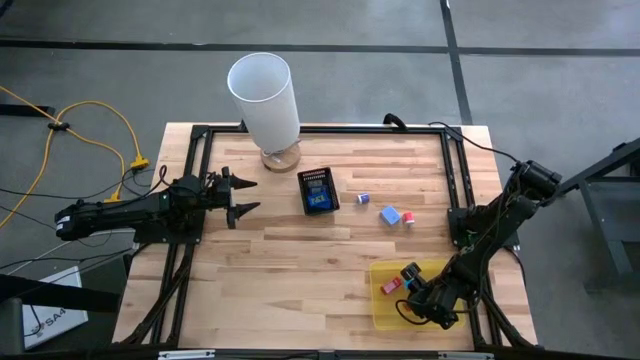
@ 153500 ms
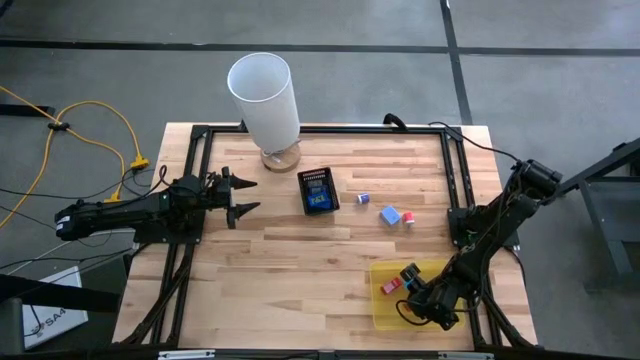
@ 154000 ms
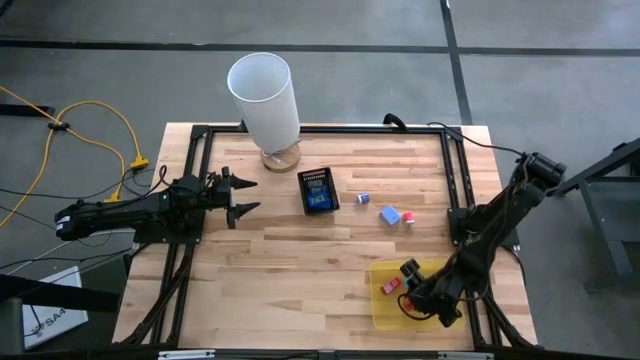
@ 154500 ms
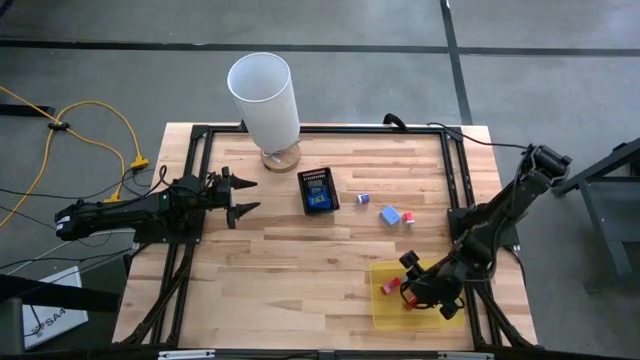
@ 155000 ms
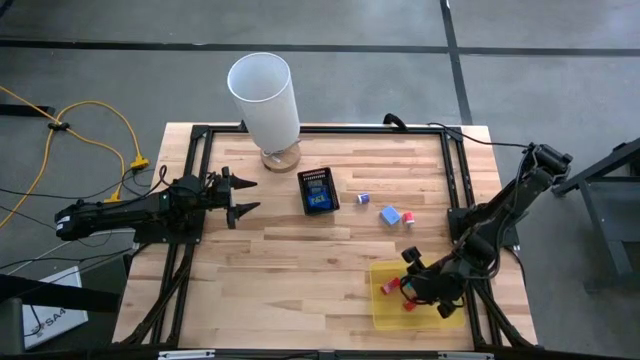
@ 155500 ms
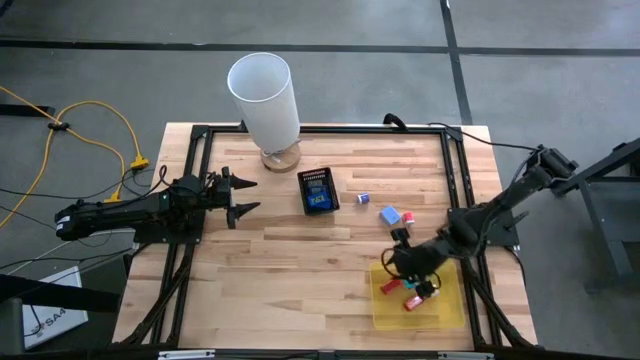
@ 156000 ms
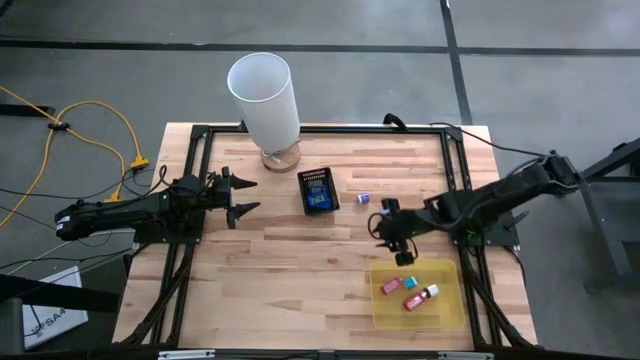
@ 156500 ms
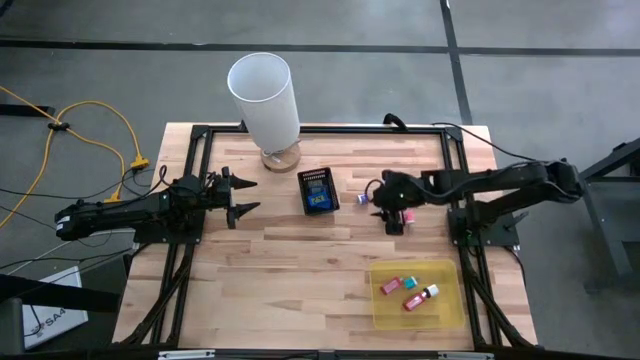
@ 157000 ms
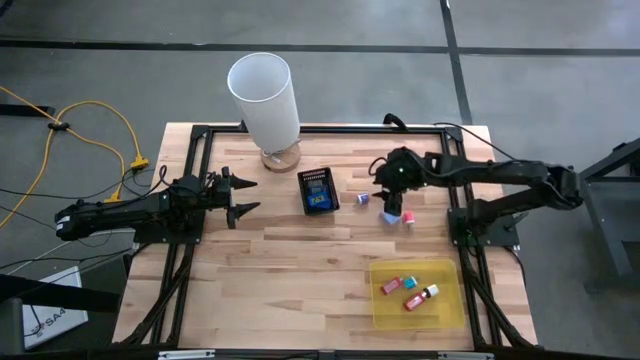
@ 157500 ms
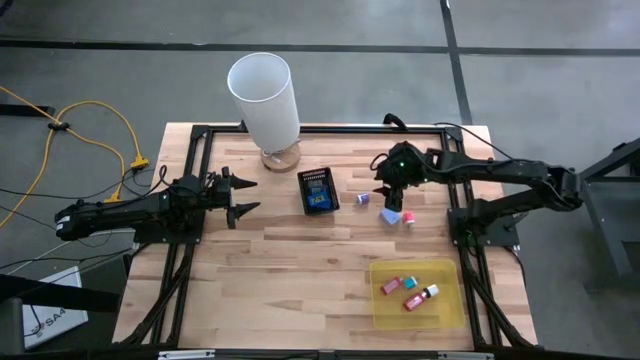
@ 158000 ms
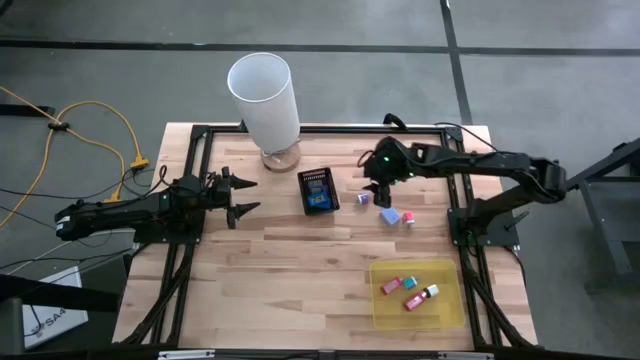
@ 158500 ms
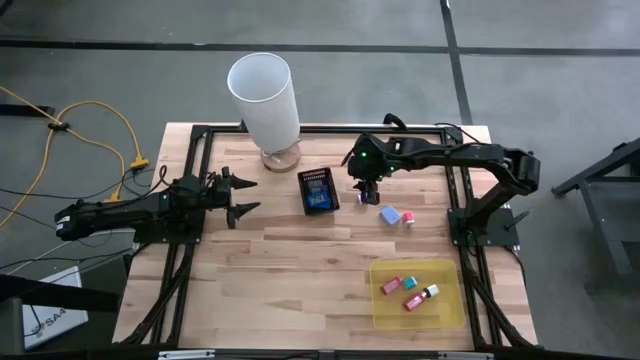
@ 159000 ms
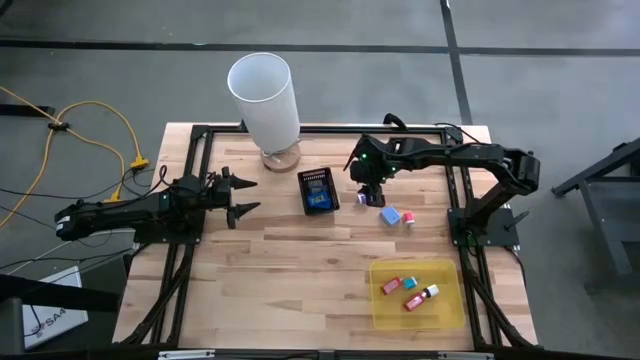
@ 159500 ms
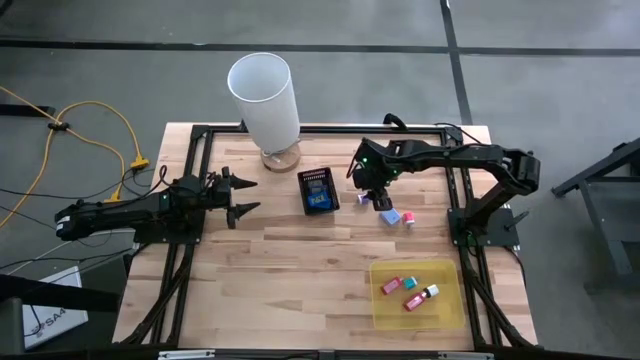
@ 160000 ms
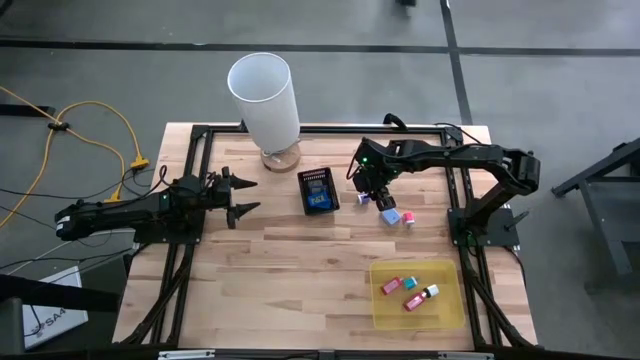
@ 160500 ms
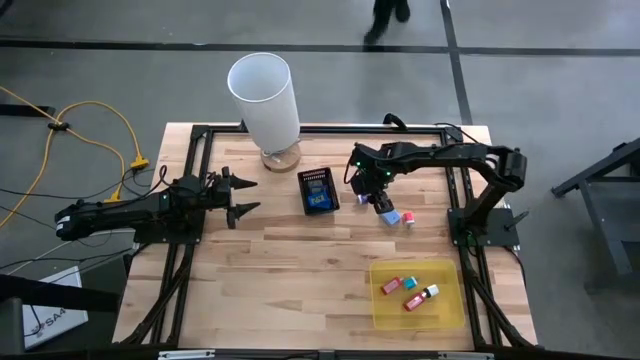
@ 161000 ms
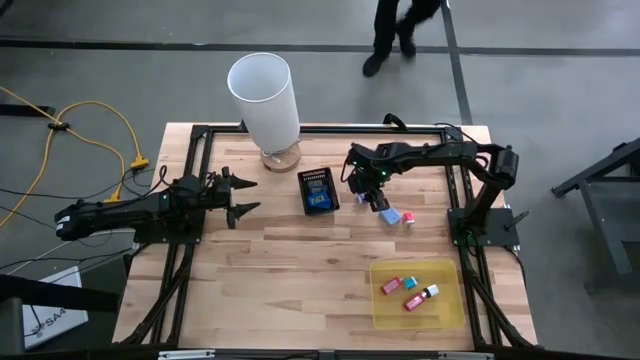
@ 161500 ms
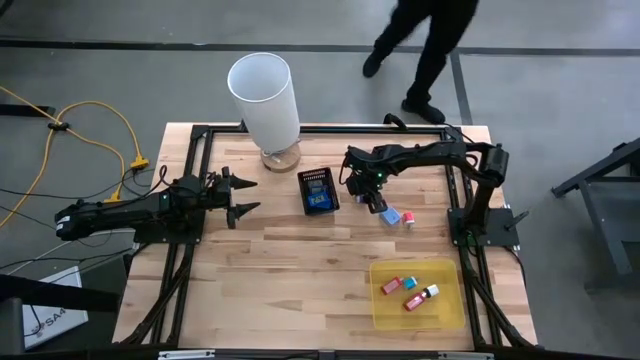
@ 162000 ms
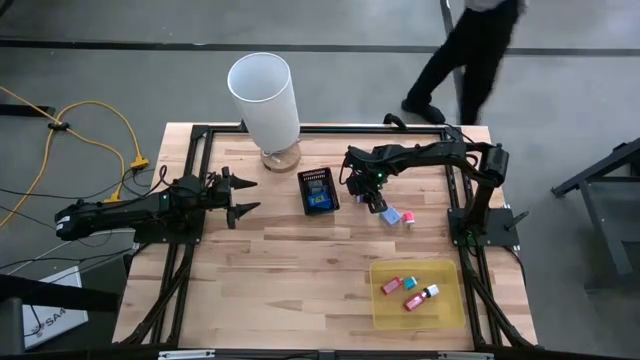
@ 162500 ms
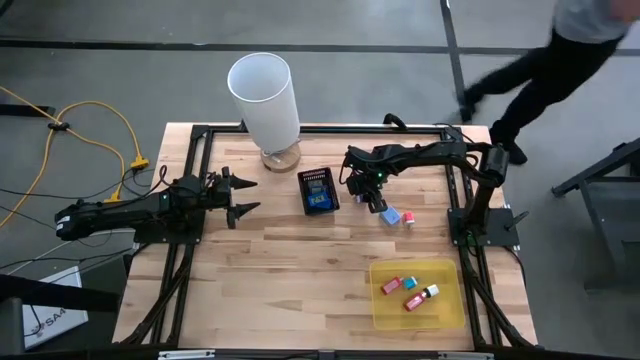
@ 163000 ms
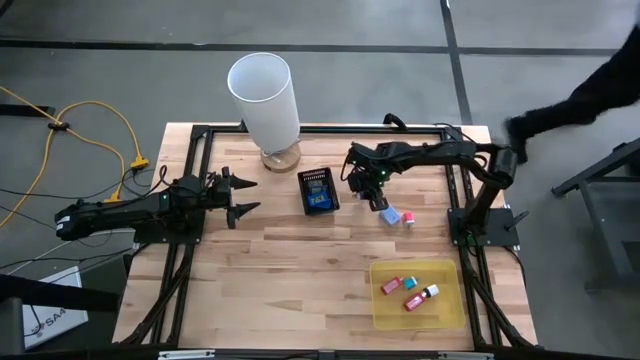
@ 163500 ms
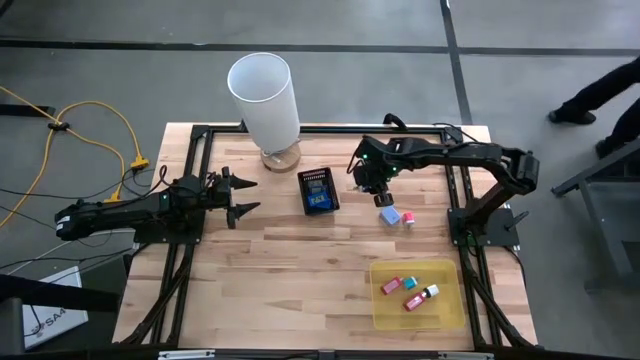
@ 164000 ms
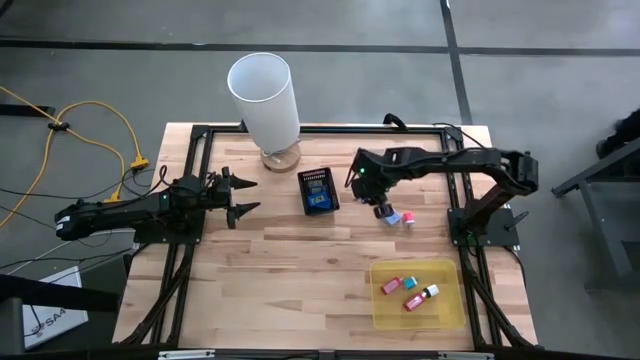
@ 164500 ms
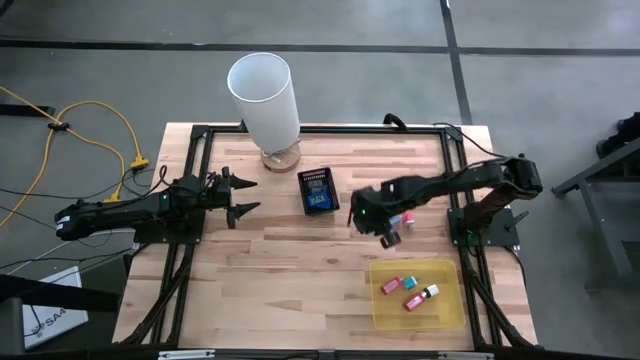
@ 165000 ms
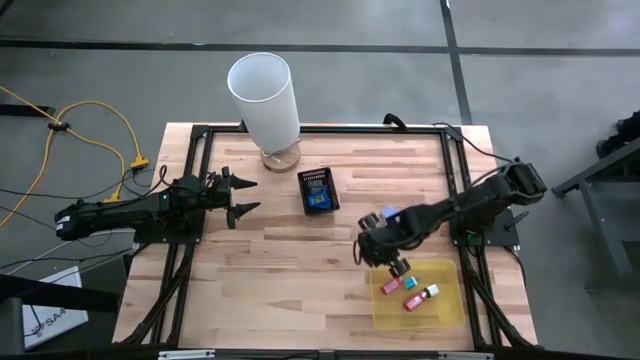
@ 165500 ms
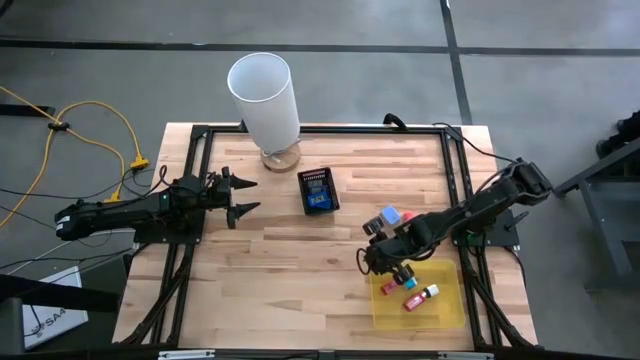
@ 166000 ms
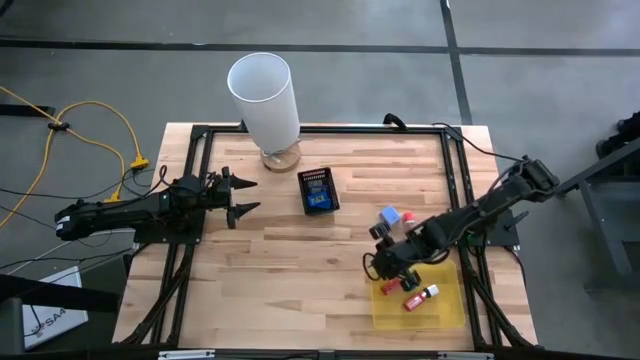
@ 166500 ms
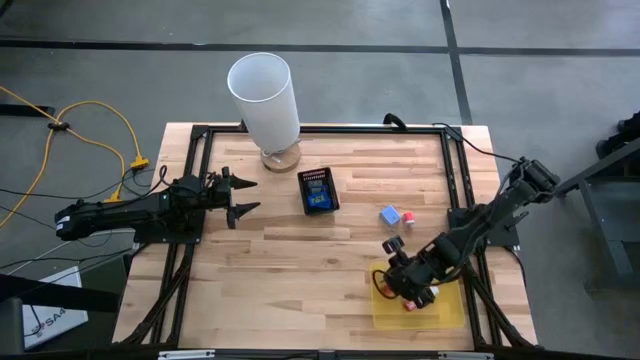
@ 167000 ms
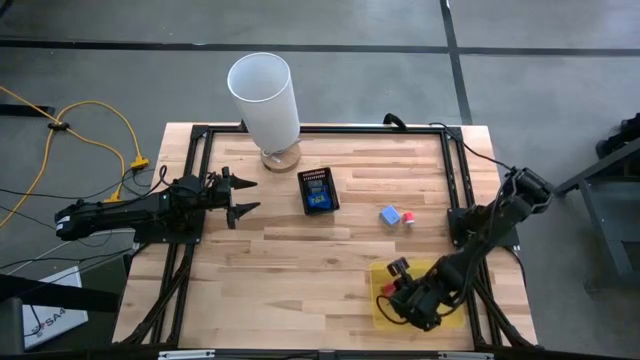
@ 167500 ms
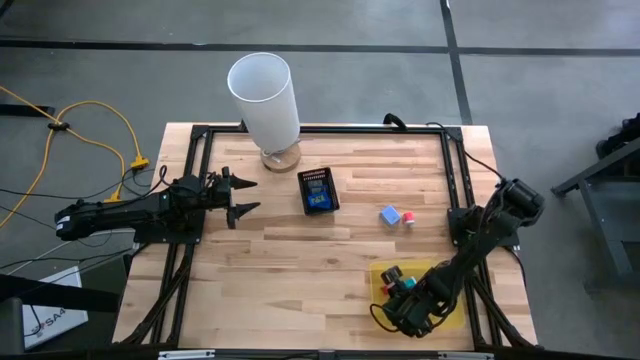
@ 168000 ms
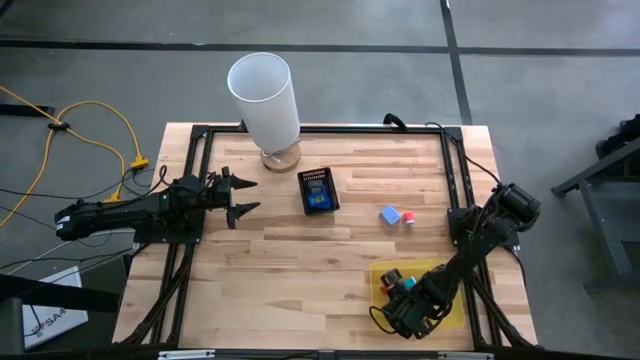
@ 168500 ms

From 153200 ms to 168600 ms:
Task: Pick & Place Office items
Put the violet charger adaptor into the yellow bin

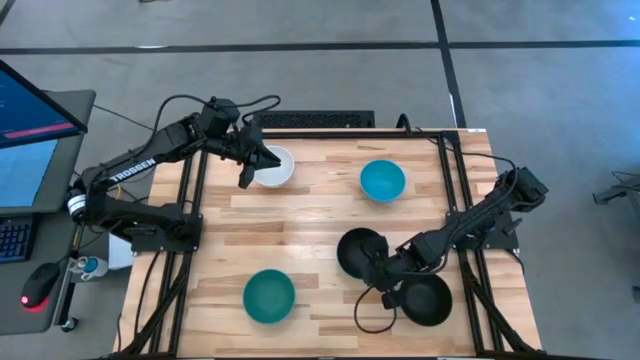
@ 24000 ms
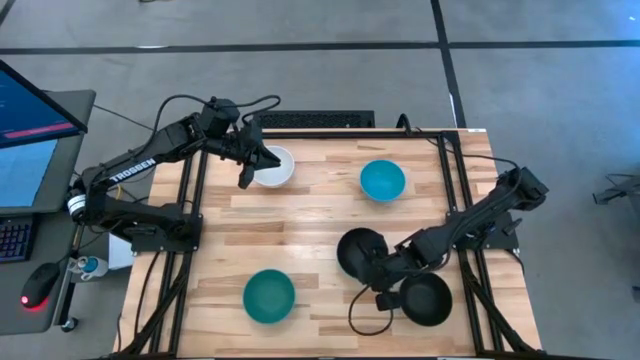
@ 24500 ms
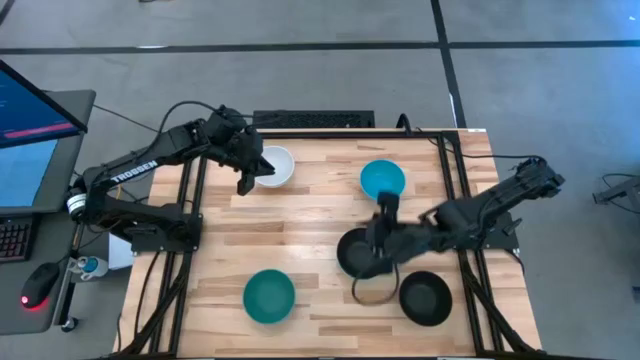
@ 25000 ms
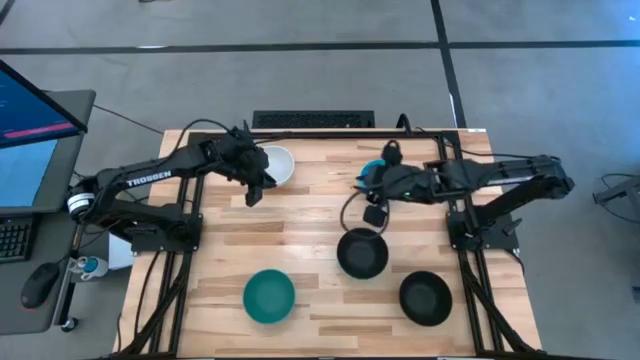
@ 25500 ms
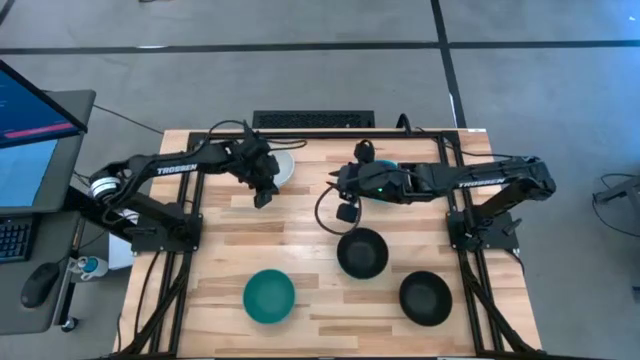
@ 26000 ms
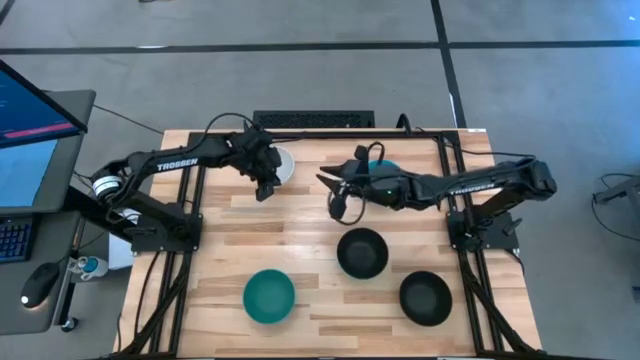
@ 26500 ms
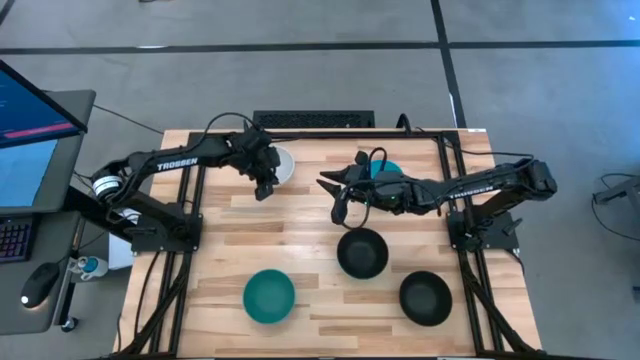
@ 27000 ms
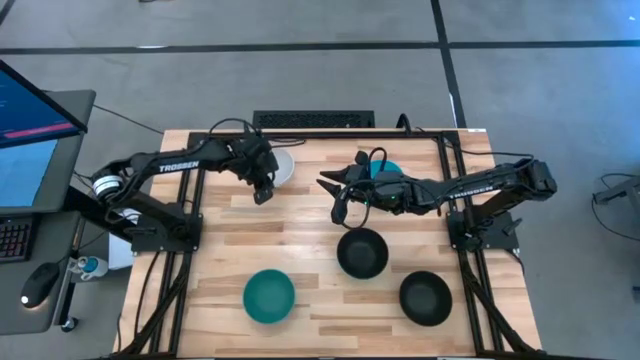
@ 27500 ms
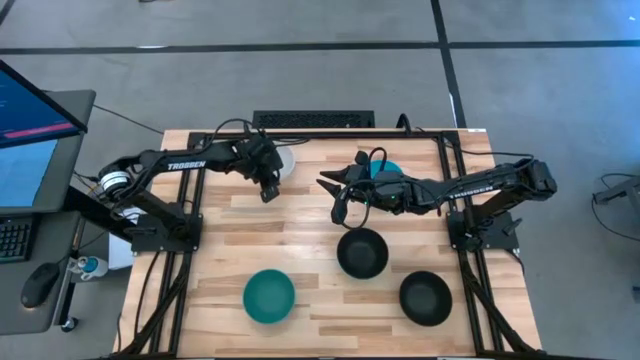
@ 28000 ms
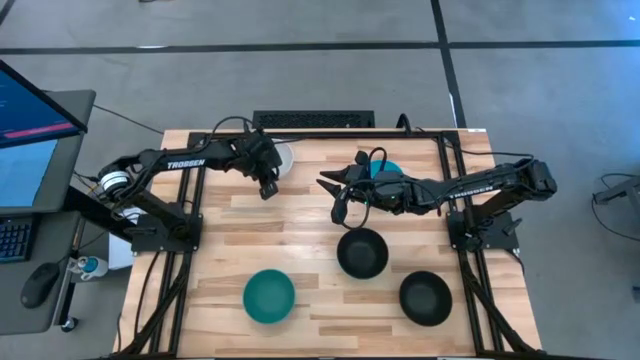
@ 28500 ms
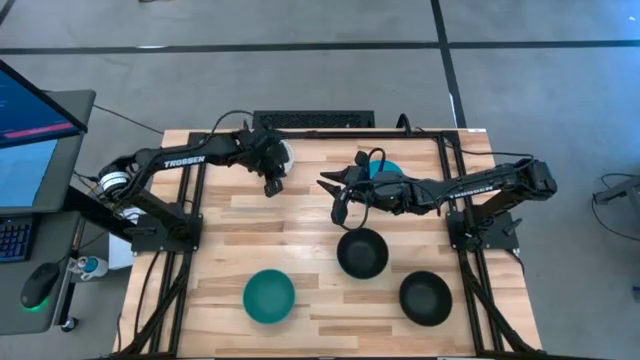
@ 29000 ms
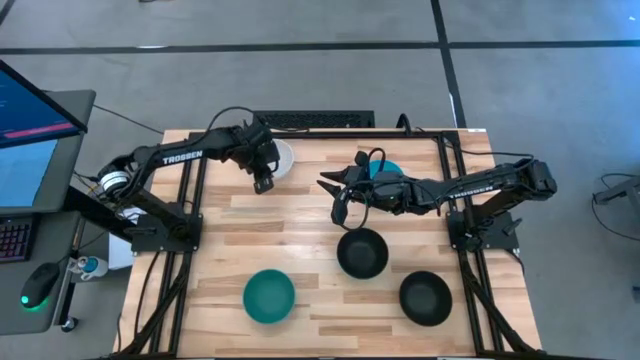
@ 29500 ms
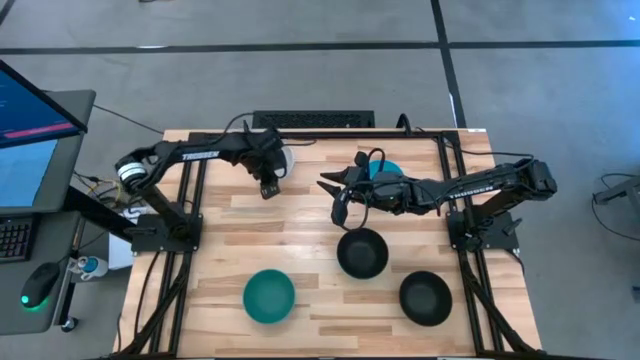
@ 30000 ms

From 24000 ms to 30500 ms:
Task: Nest bowls inside each other
Stack the white bowl on the black bowl
